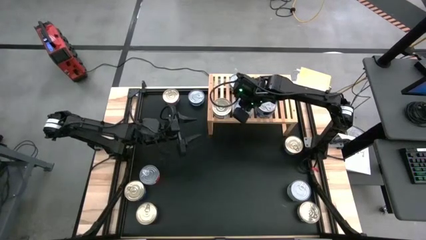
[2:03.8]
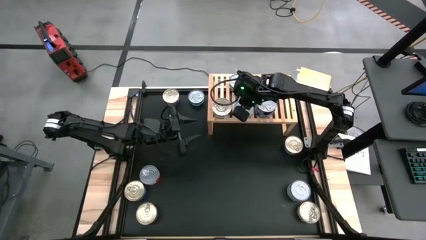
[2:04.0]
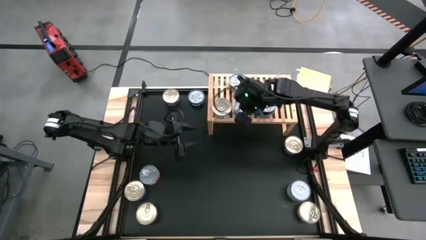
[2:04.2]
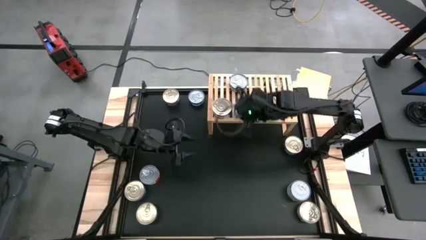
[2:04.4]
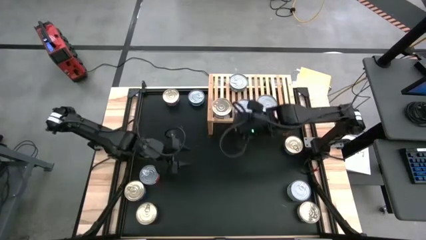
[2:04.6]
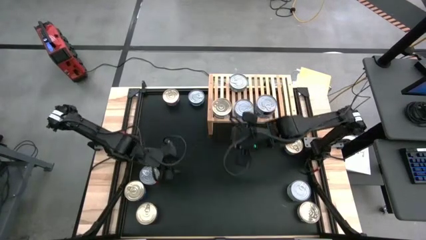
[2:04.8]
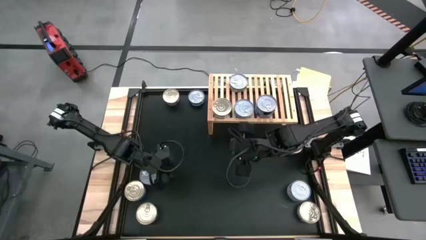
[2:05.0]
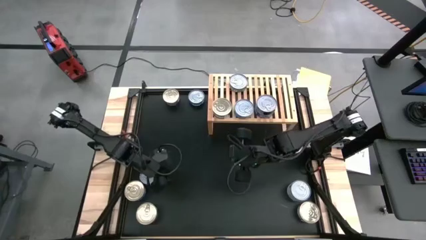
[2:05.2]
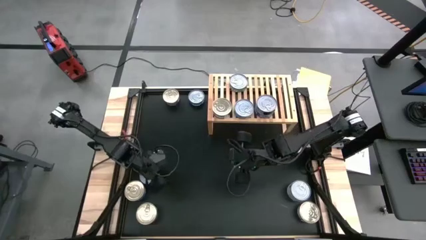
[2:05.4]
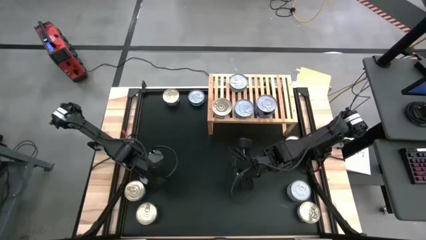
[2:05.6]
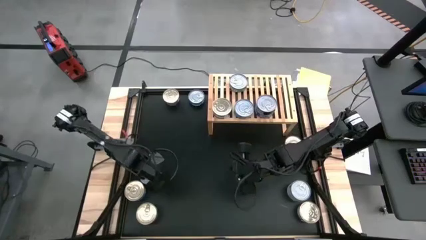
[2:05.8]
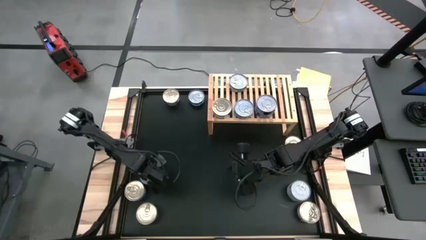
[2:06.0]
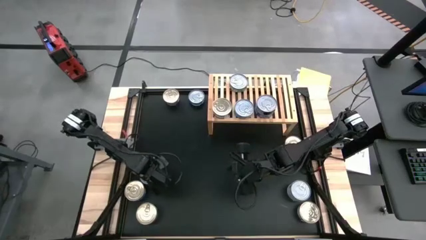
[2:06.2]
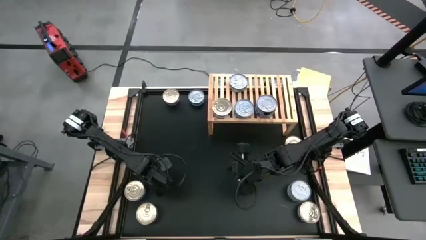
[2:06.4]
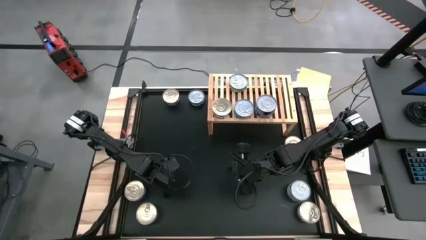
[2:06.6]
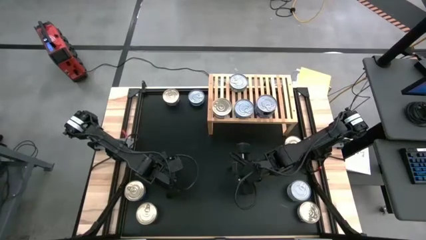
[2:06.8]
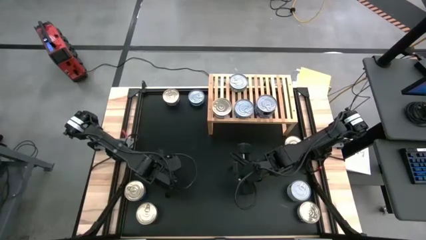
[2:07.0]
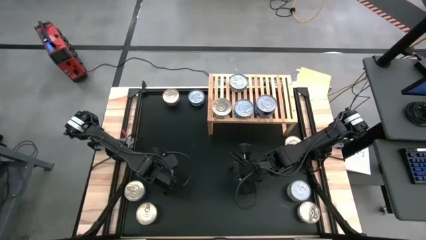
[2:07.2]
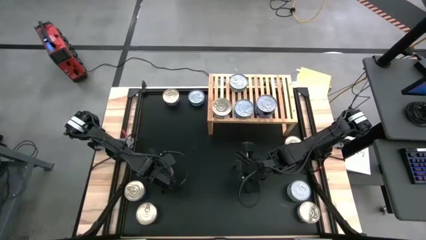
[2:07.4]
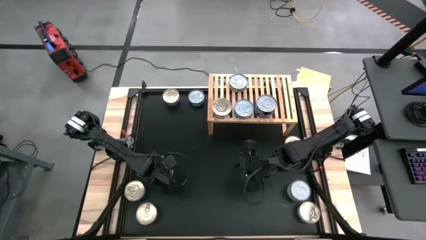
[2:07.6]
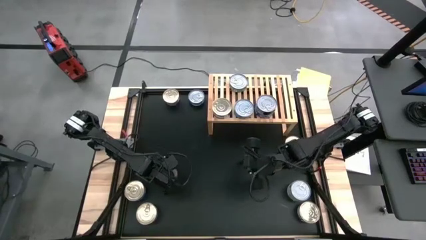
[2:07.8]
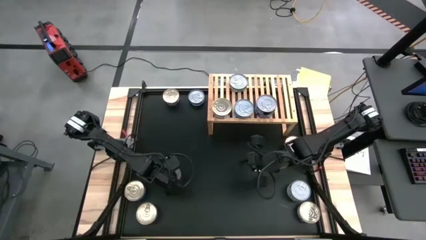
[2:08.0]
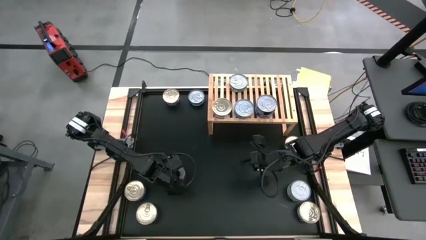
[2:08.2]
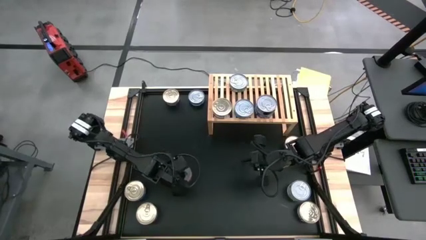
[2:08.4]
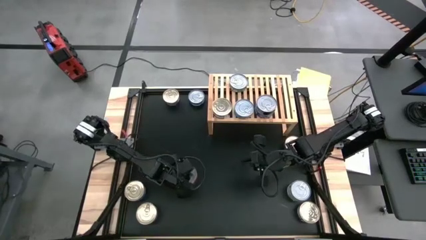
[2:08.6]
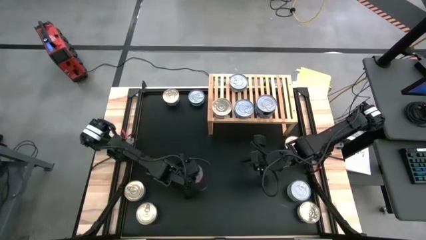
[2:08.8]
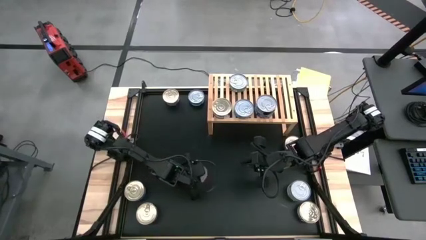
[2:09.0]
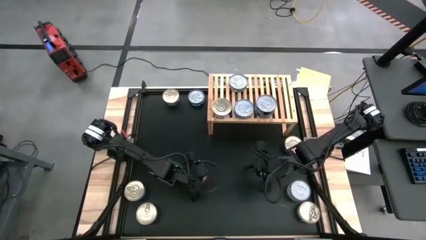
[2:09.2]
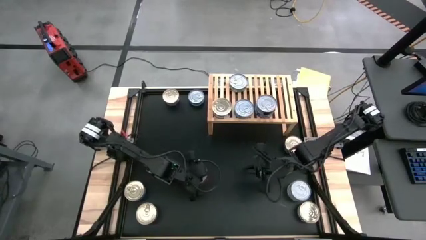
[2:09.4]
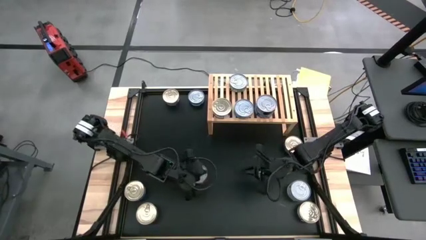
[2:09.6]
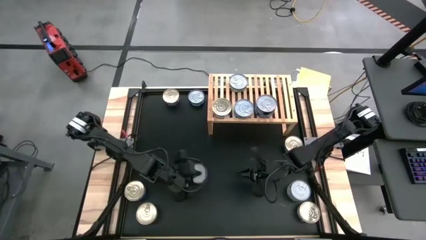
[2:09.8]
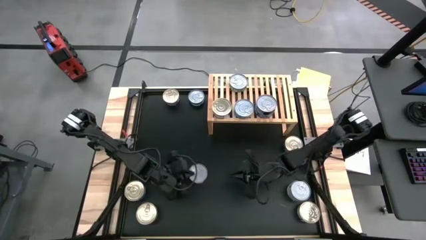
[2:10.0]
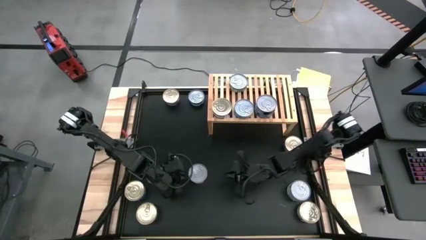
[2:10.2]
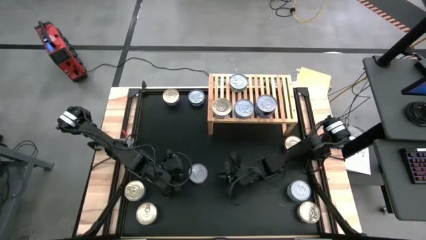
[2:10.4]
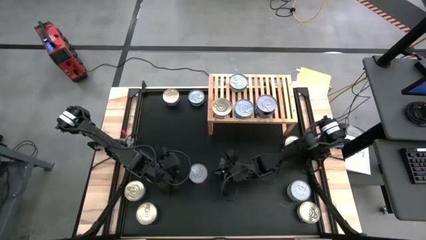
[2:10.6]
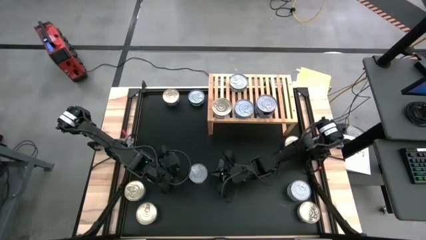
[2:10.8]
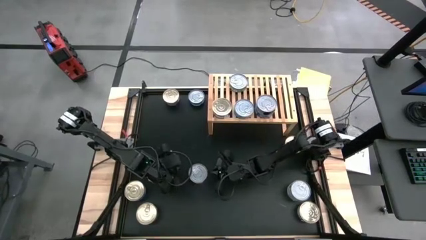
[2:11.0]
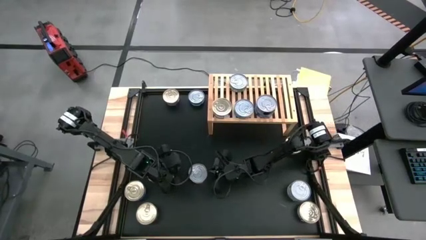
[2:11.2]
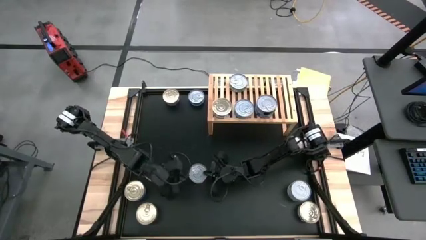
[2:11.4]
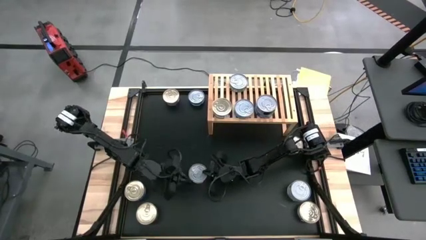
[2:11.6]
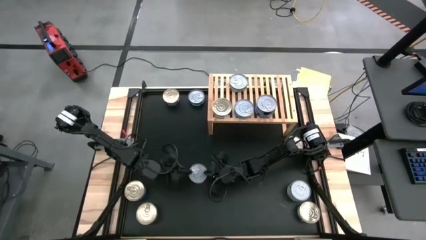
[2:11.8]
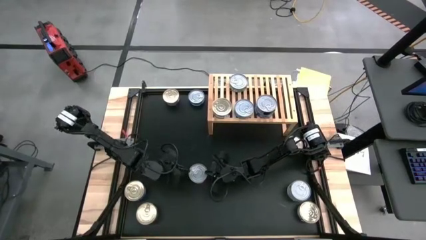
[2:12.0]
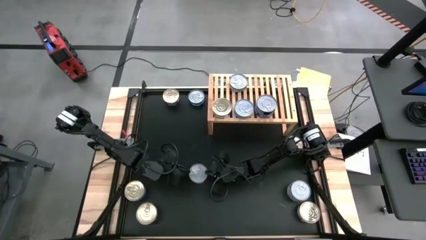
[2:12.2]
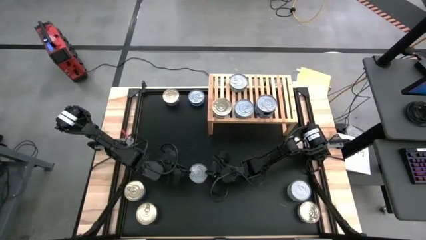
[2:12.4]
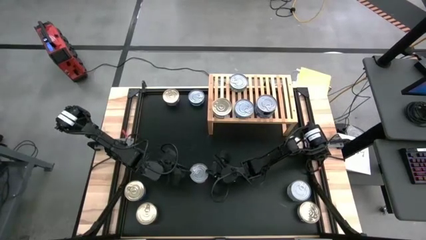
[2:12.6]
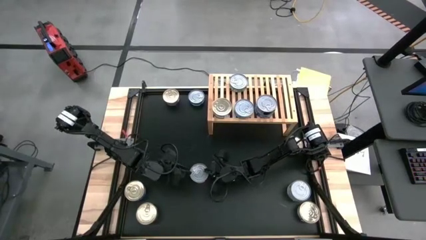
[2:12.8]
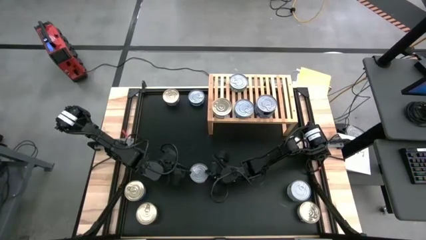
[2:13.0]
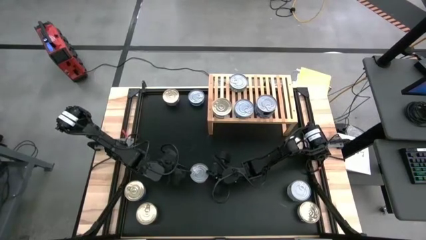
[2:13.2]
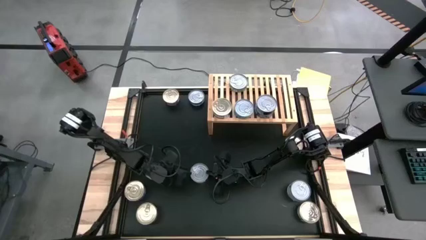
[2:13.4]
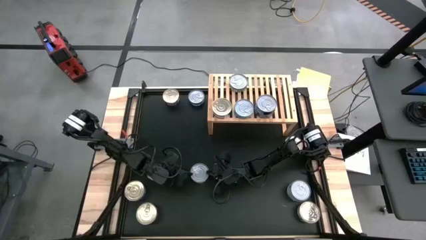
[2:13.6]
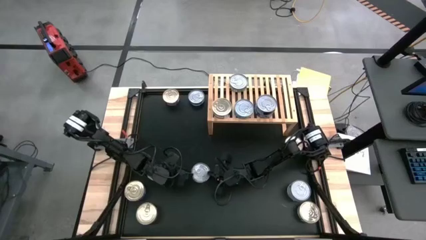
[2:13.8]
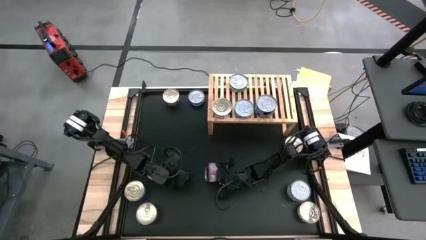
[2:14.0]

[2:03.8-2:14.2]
Task: Stack canned seafood by type on shelf
Put the red tuna can on the shelf
